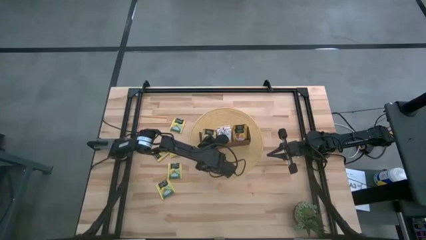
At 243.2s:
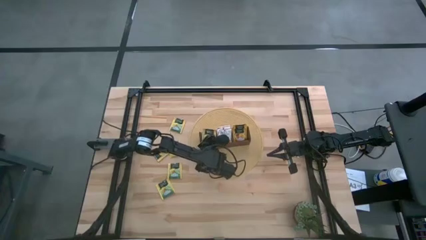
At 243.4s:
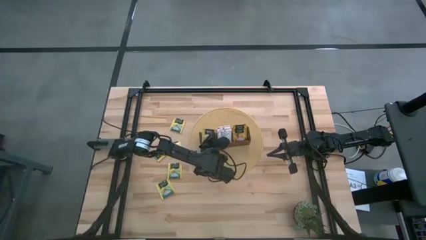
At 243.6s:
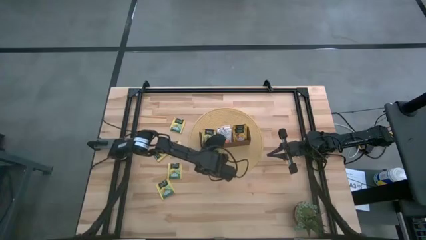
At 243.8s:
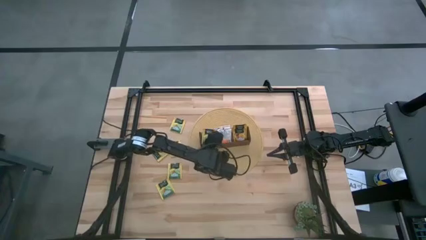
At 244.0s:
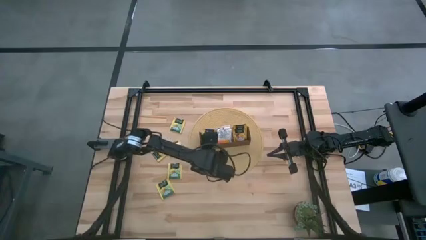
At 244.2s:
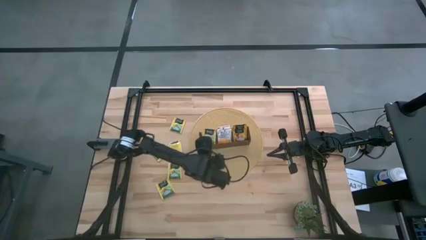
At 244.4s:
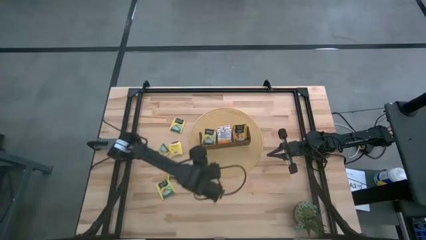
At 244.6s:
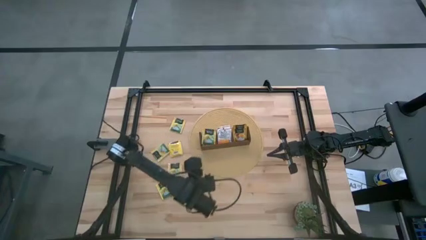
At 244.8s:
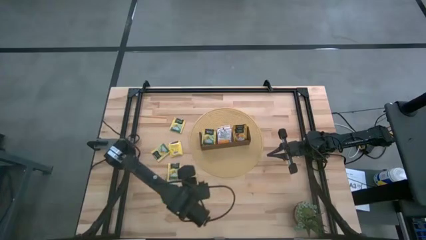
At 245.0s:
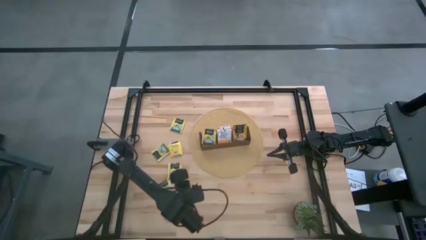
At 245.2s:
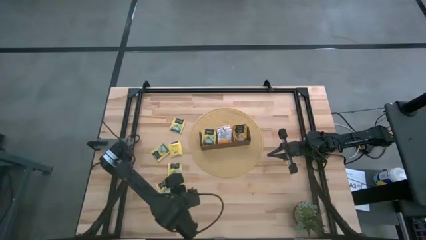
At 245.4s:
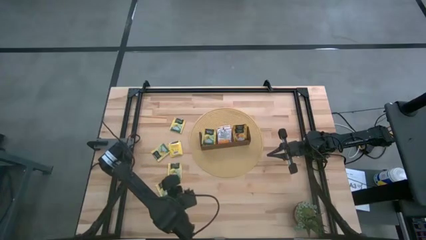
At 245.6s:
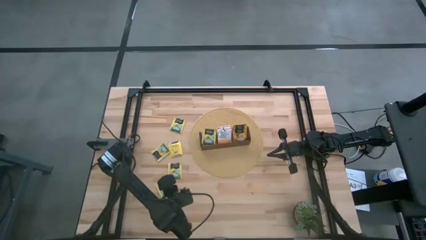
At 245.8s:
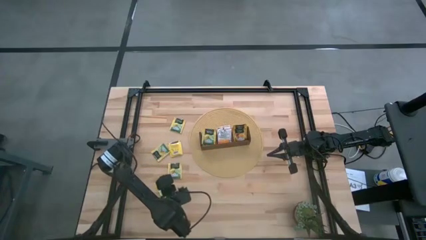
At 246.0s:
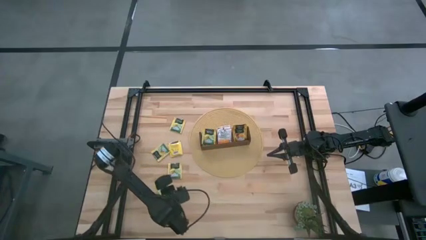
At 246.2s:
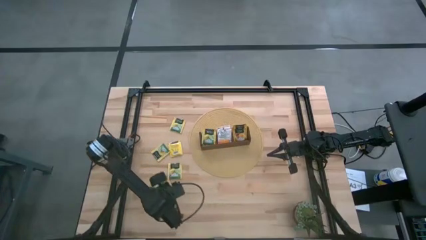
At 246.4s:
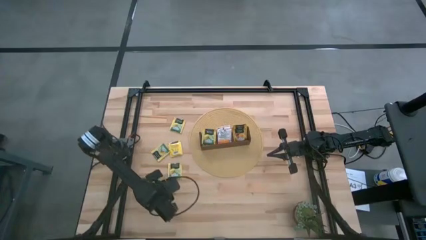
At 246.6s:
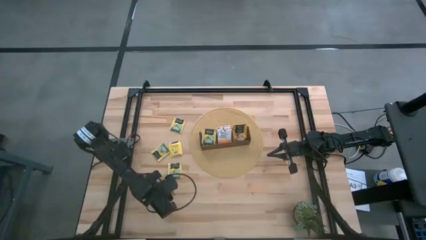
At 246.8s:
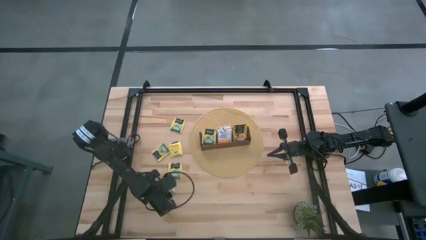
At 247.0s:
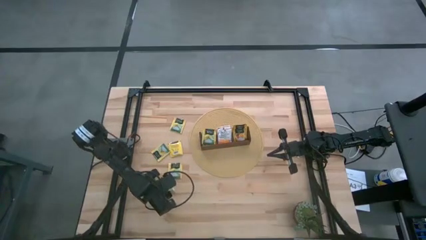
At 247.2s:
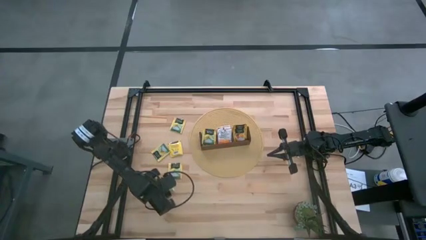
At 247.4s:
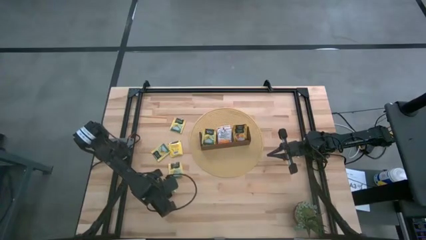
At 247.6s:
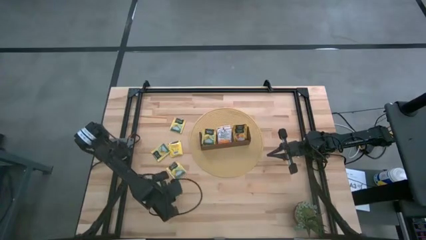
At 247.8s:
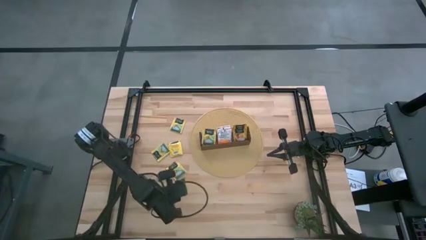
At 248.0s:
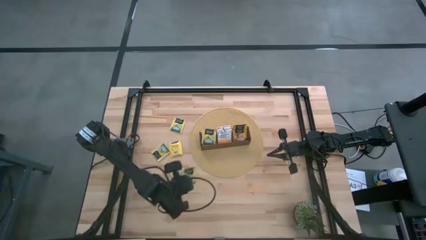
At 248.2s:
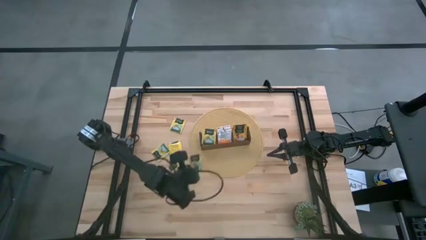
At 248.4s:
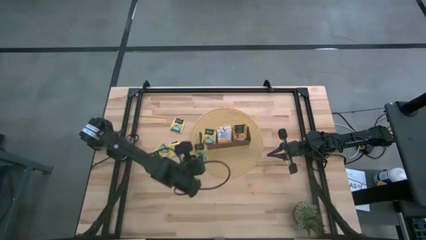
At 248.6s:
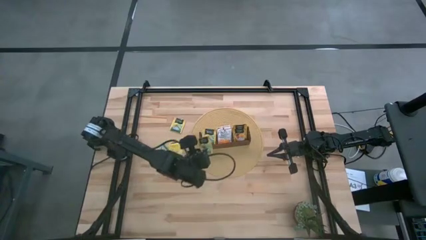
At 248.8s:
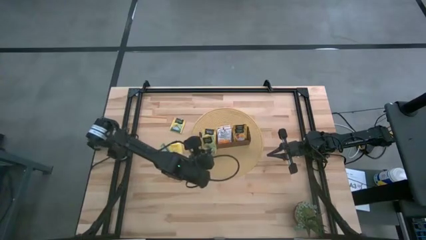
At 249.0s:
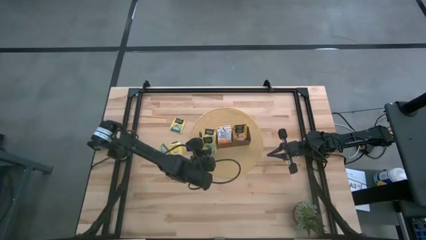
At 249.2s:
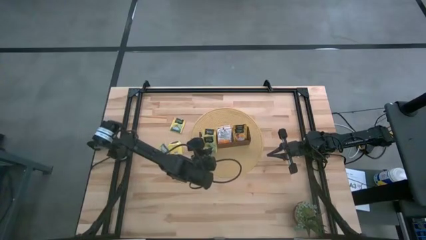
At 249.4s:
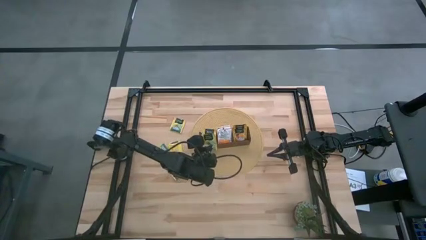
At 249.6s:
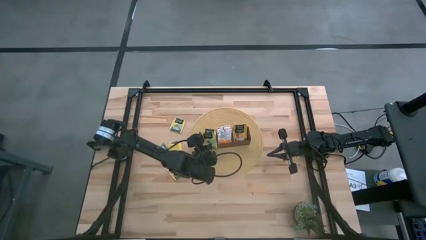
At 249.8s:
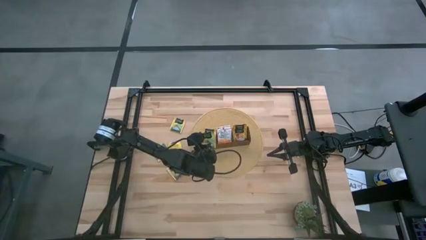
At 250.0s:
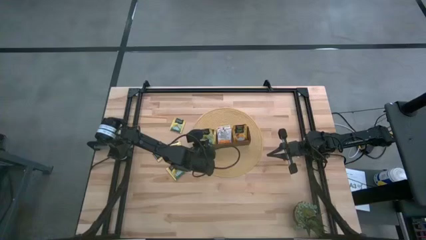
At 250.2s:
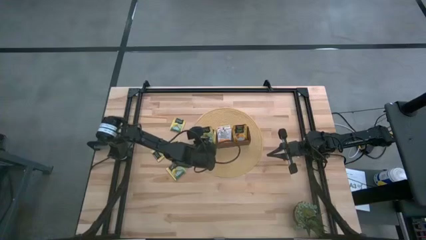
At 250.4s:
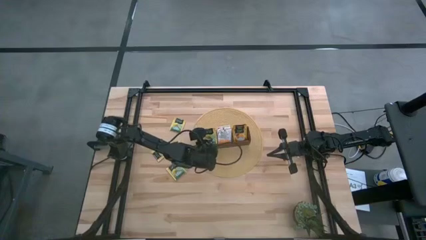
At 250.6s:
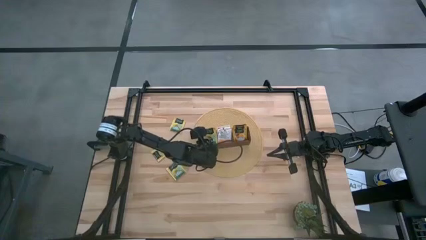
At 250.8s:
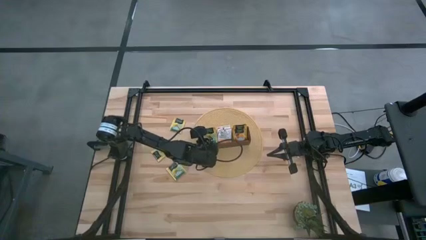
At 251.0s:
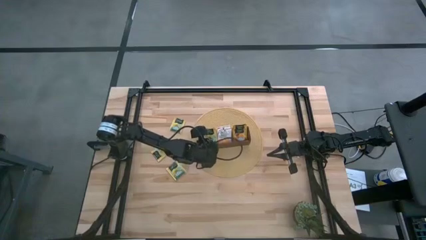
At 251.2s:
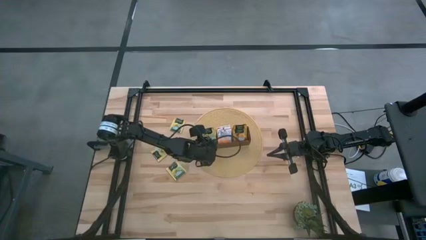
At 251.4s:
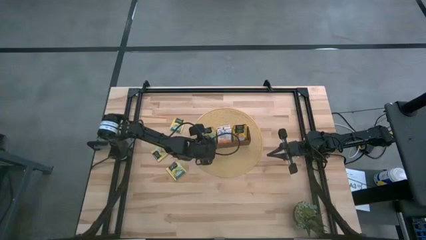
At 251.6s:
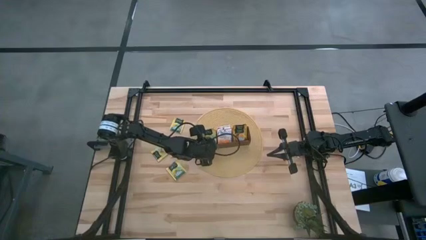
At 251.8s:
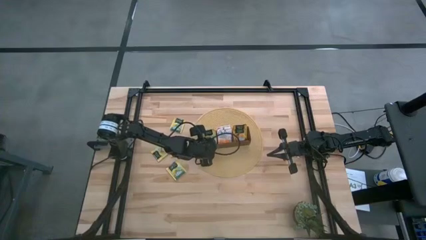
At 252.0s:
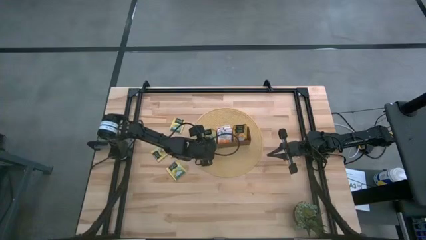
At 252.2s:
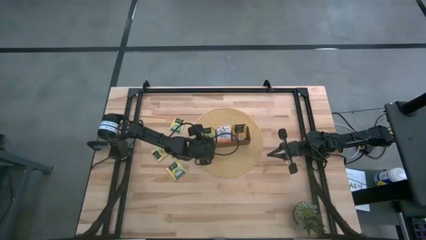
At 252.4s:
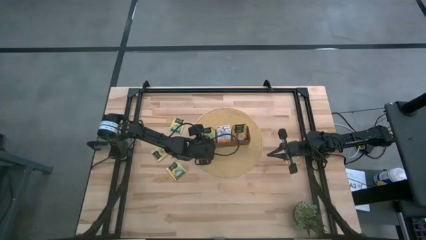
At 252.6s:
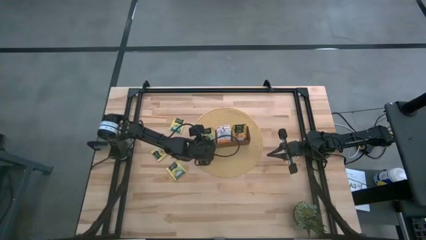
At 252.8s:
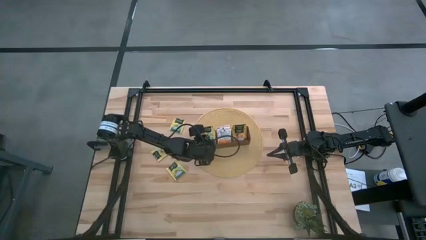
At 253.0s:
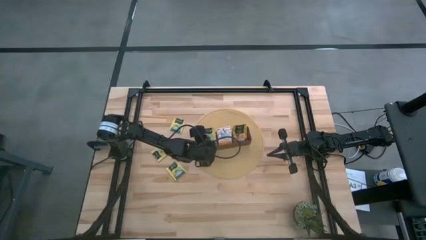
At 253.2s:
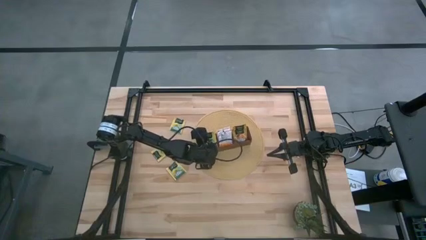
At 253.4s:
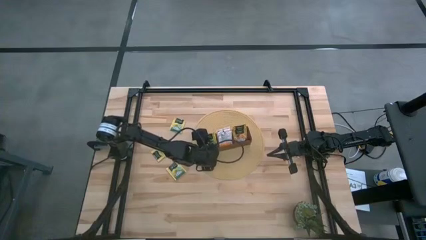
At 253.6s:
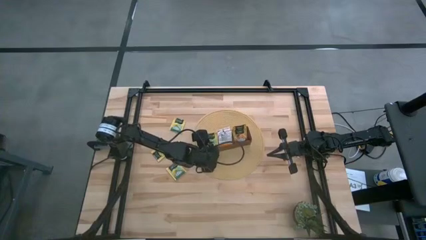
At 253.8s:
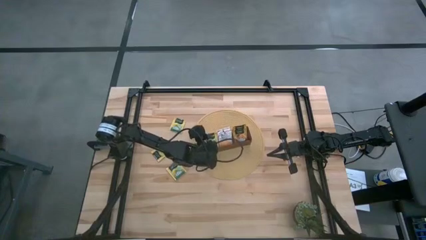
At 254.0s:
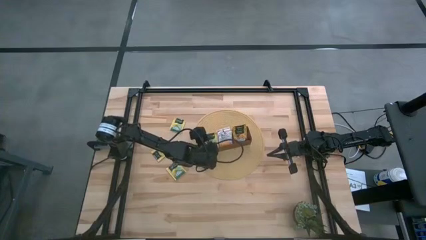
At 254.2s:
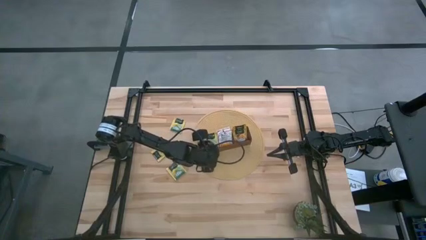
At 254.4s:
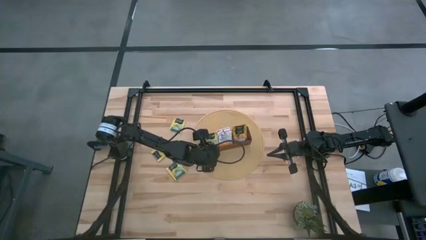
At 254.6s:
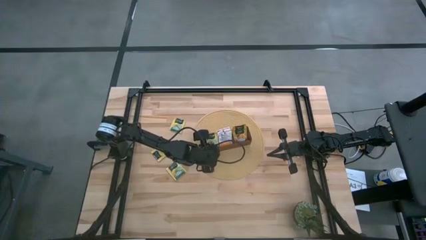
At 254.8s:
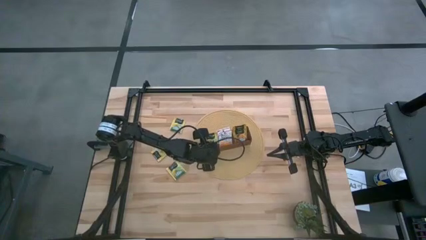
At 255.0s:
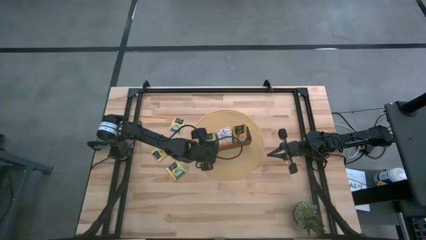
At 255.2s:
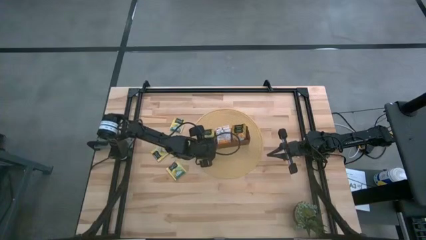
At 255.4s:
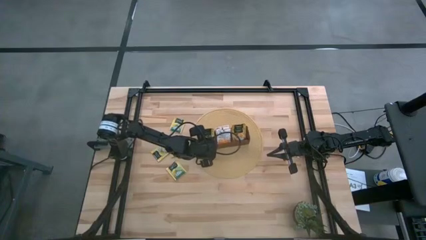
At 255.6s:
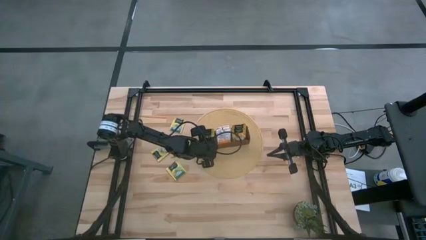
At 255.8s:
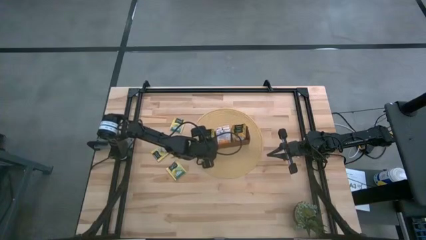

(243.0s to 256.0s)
Task: Pick & Place Tea
Put the yellow tea bag into the left section of the wooden organizer

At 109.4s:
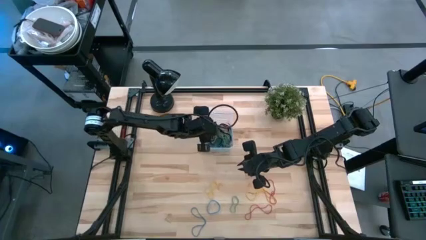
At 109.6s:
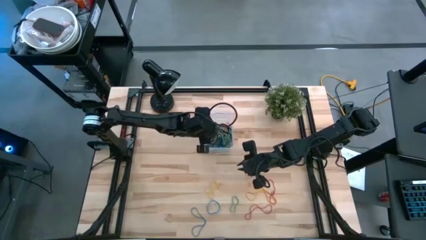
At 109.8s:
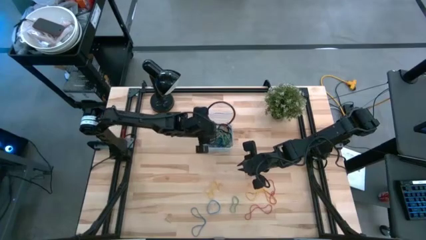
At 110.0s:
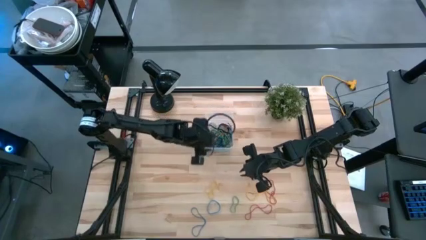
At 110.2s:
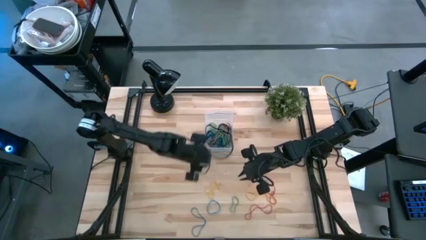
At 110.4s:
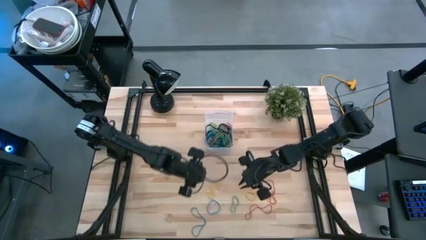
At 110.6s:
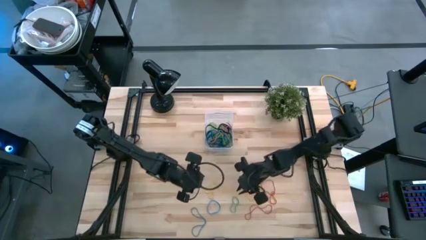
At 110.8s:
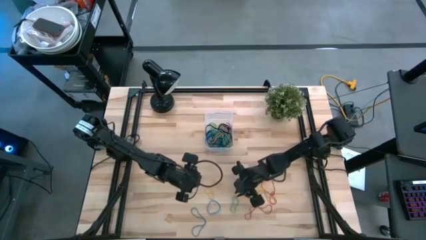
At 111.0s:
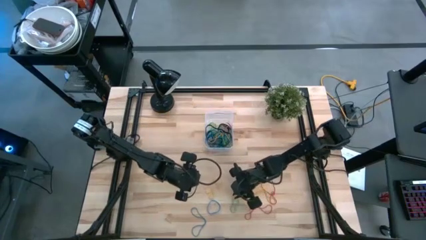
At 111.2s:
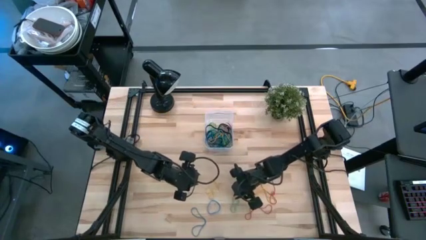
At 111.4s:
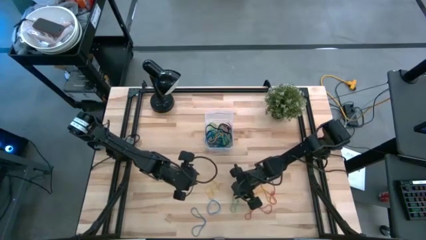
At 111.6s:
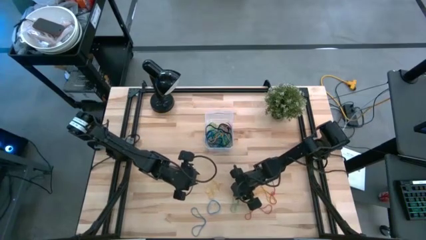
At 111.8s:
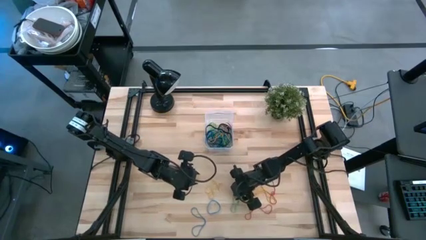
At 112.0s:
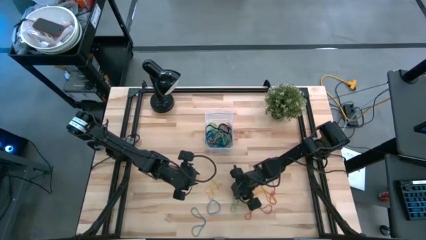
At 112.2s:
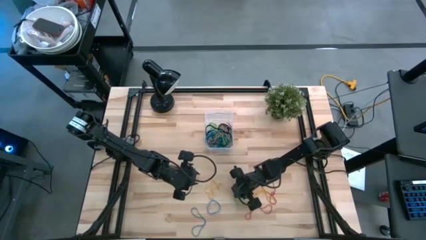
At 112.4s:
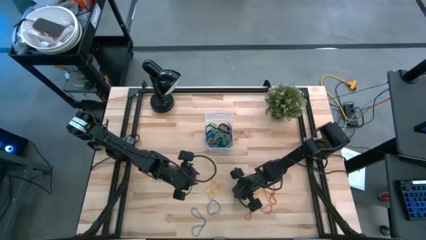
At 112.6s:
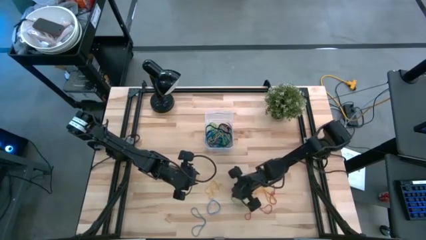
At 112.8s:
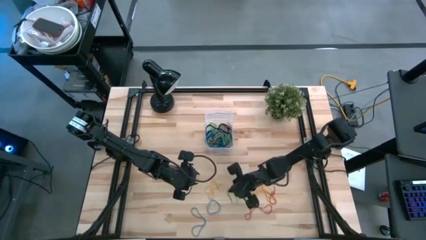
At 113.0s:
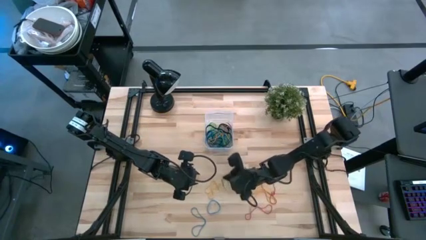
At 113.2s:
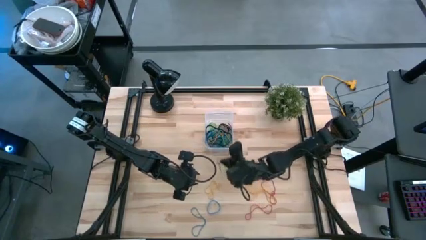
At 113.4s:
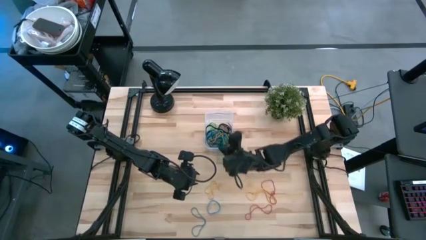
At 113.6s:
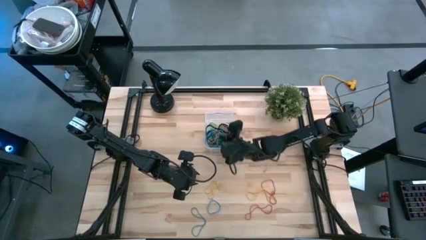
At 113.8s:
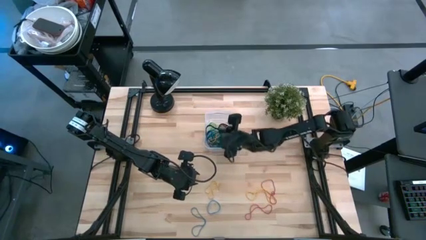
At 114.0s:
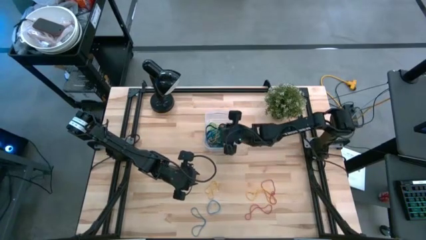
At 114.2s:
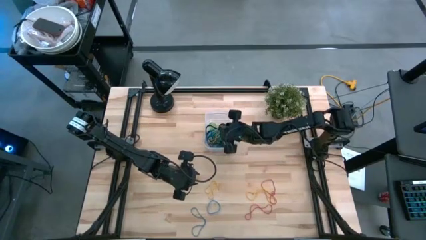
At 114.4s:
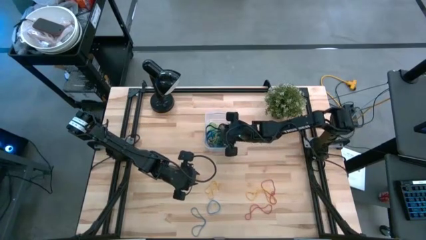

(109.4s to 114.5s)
Task: Pick and place rubber bands into bin
Put green rubberband into the transparent bin
